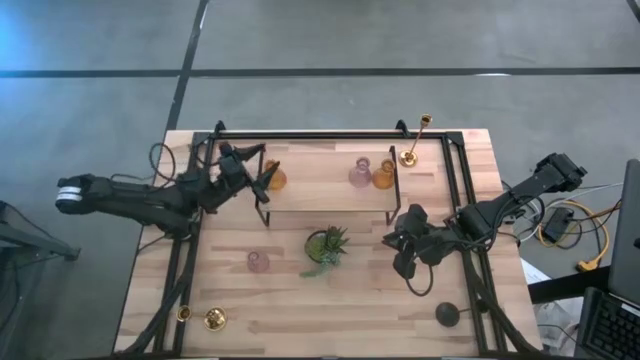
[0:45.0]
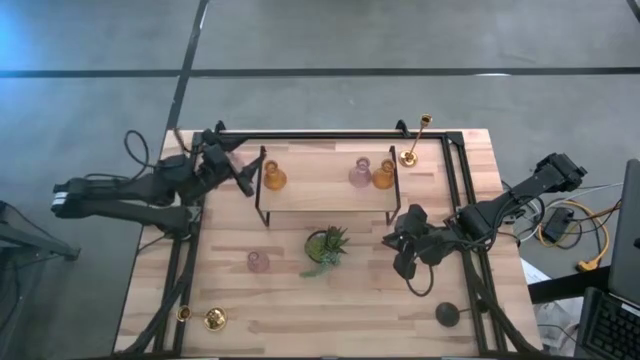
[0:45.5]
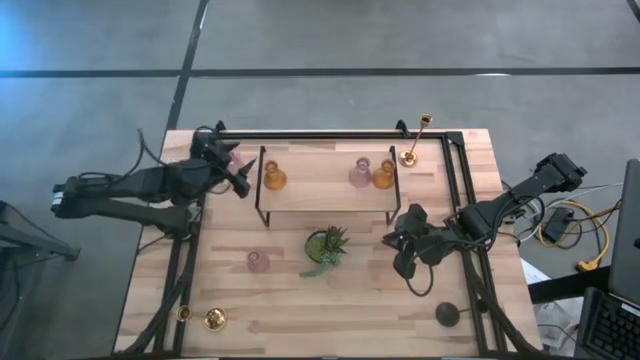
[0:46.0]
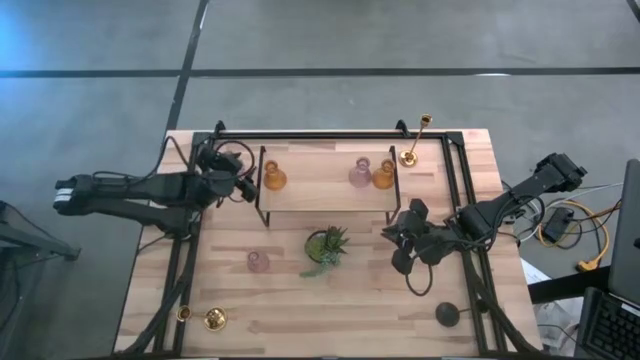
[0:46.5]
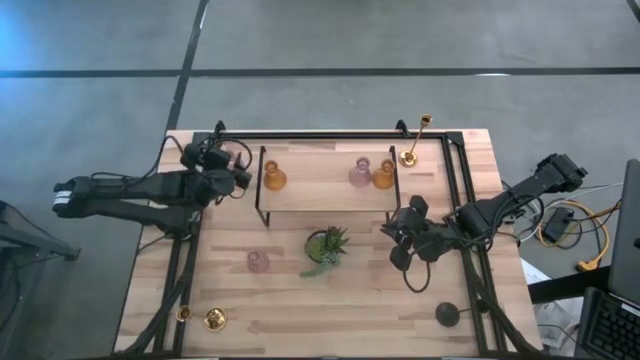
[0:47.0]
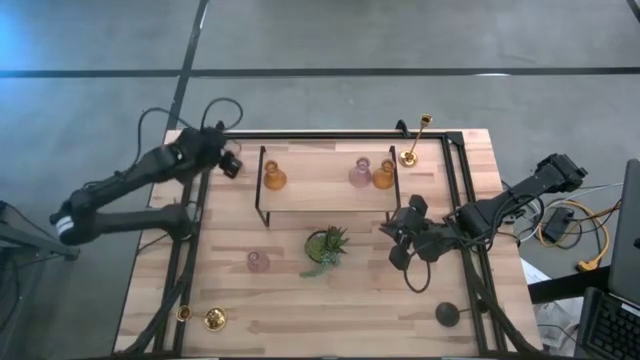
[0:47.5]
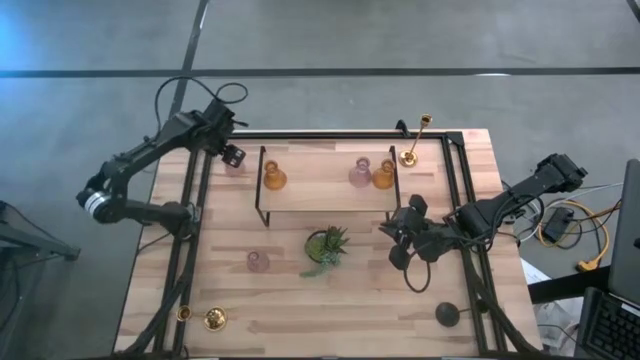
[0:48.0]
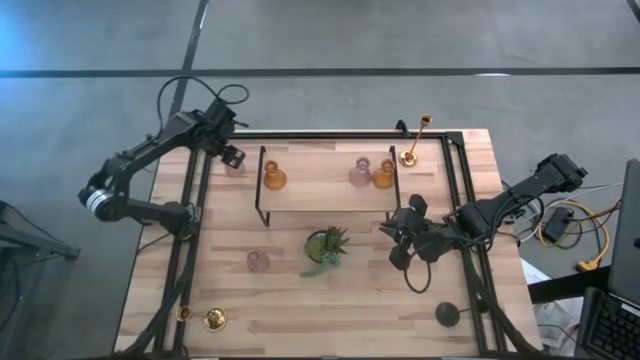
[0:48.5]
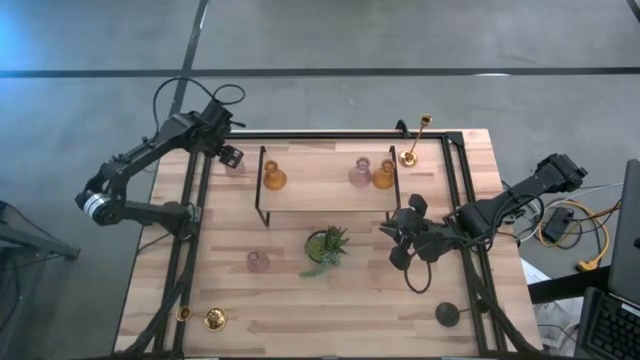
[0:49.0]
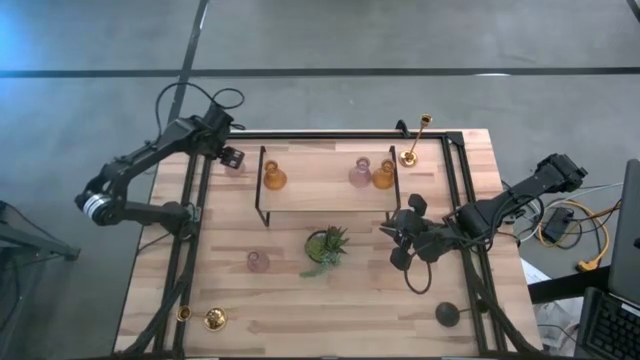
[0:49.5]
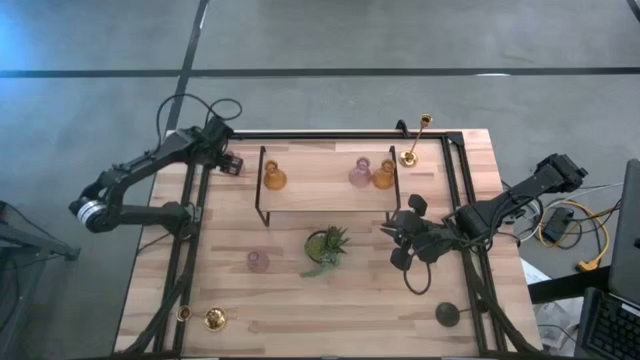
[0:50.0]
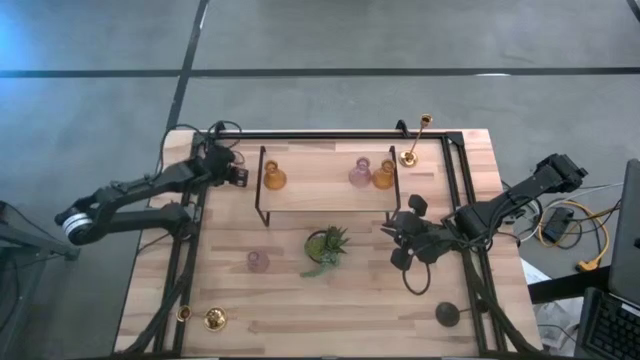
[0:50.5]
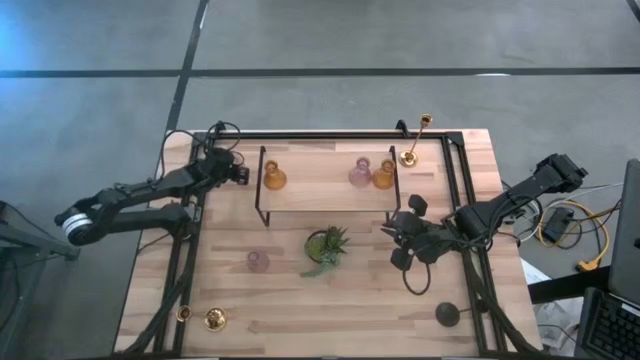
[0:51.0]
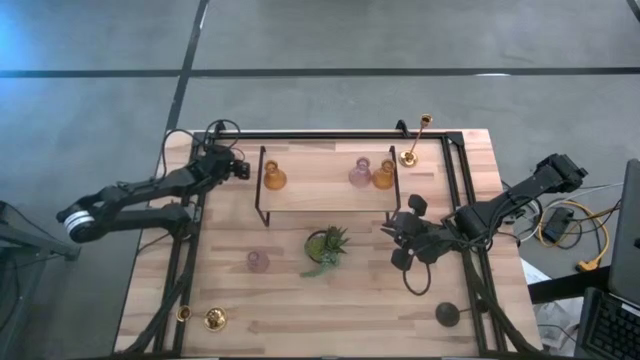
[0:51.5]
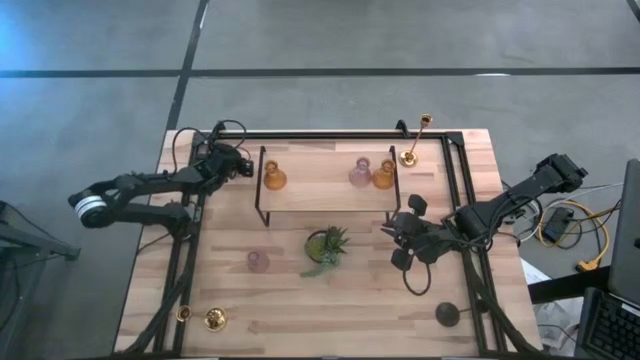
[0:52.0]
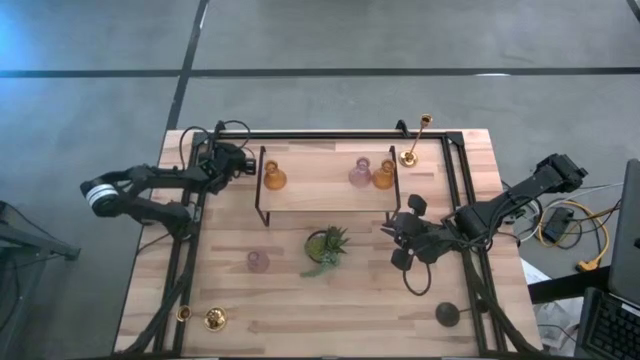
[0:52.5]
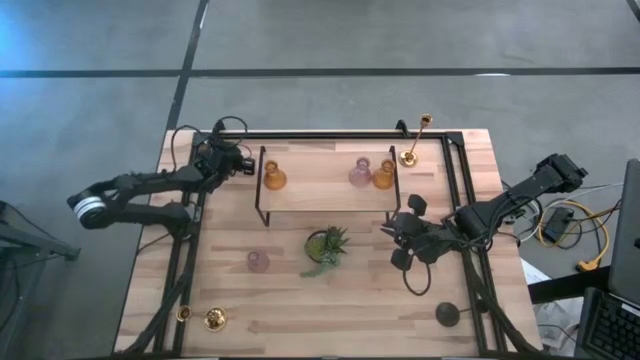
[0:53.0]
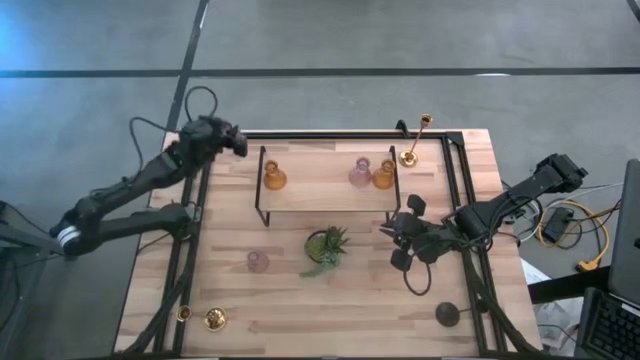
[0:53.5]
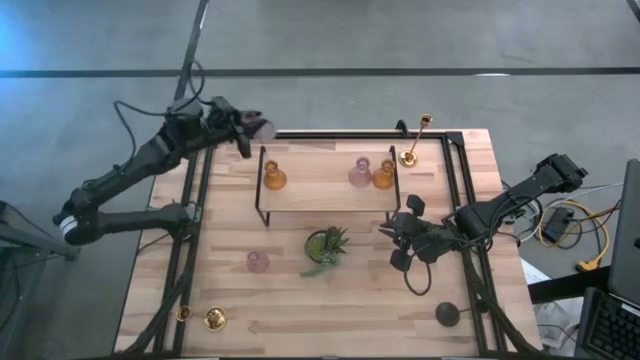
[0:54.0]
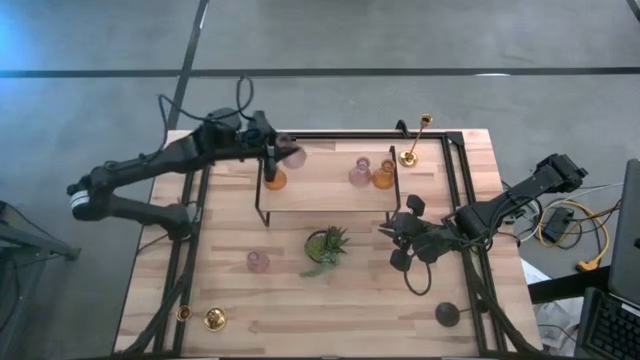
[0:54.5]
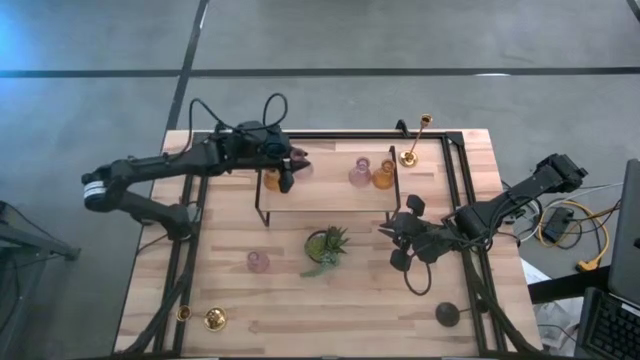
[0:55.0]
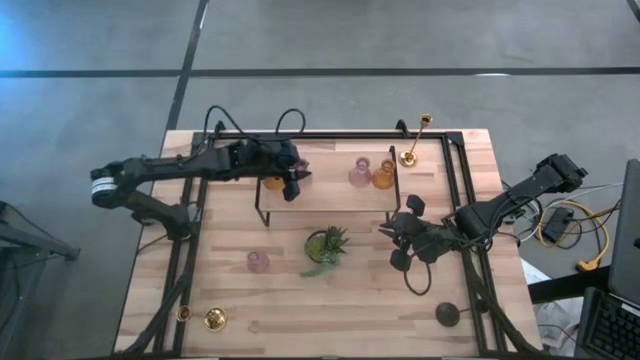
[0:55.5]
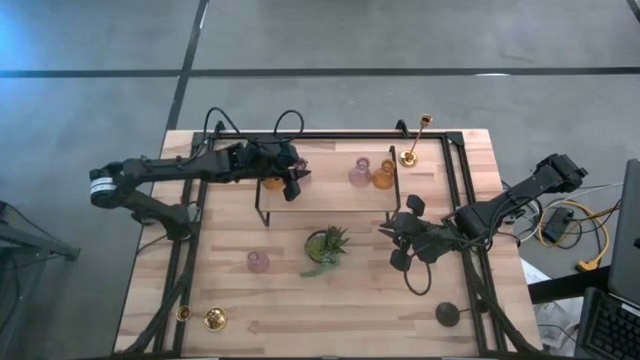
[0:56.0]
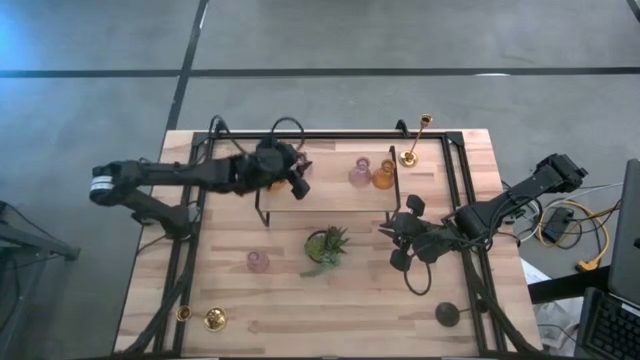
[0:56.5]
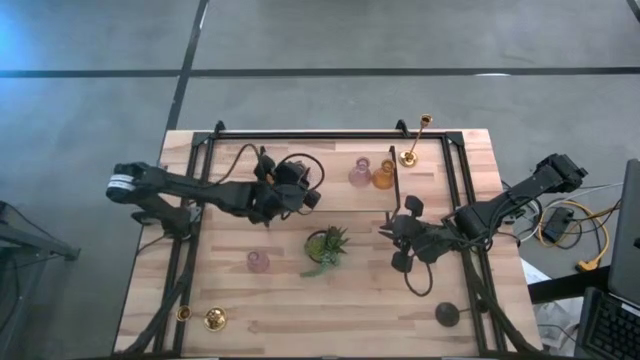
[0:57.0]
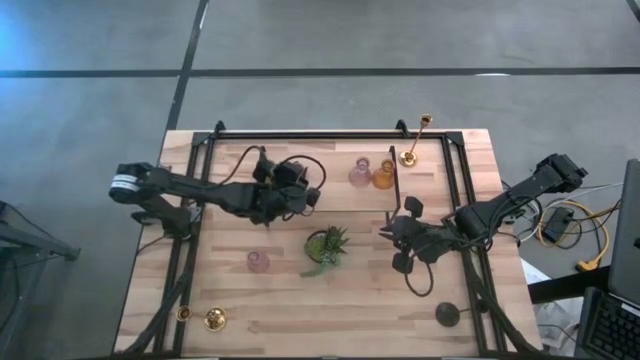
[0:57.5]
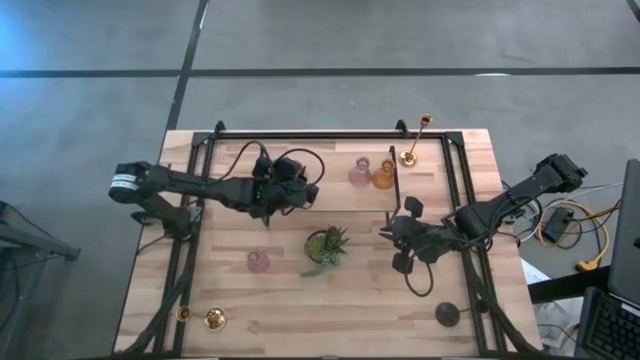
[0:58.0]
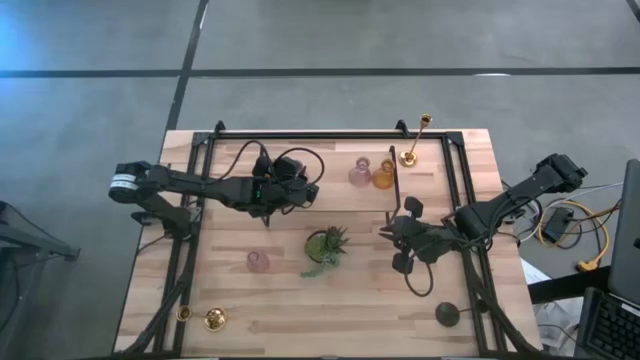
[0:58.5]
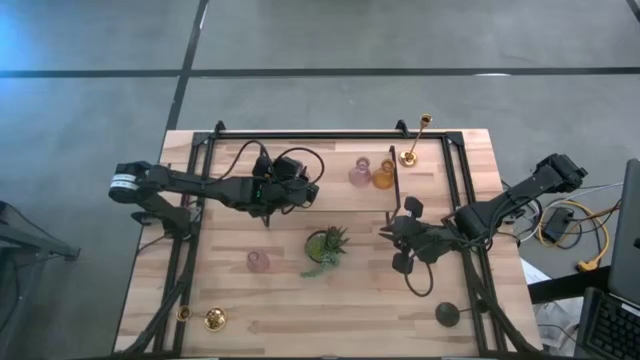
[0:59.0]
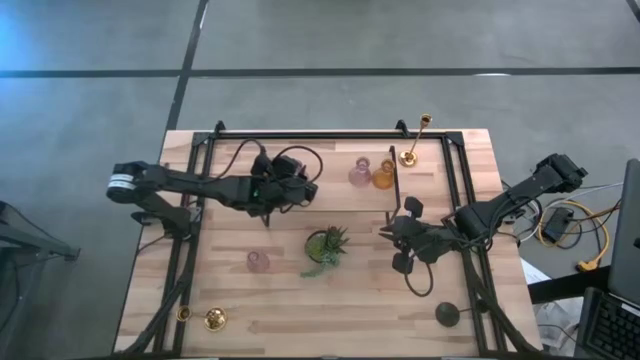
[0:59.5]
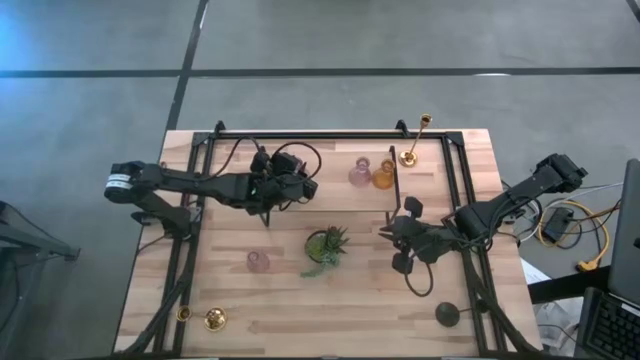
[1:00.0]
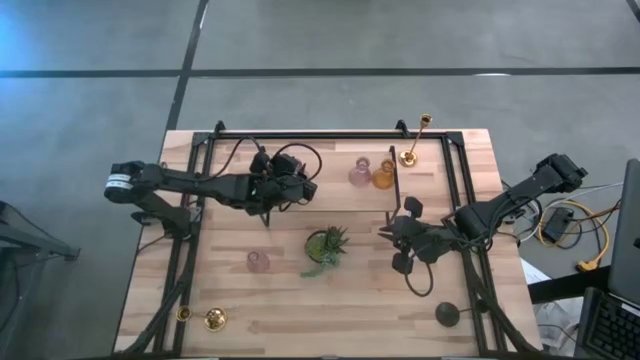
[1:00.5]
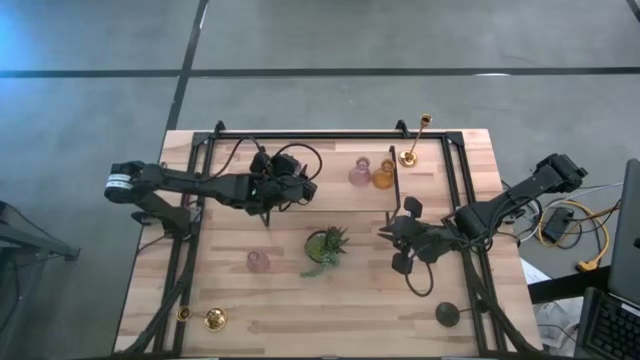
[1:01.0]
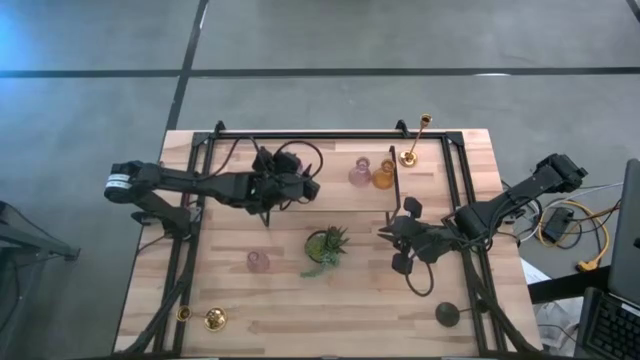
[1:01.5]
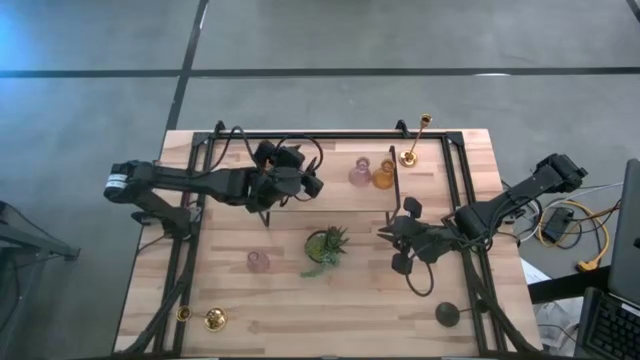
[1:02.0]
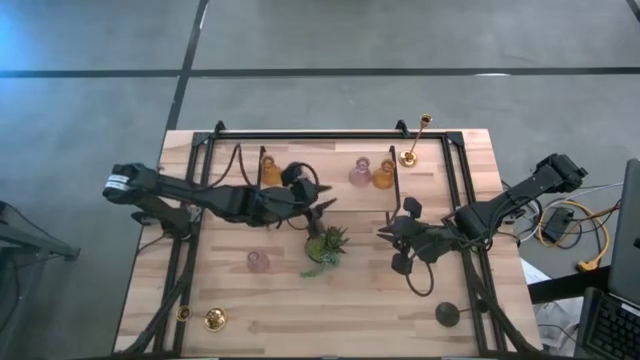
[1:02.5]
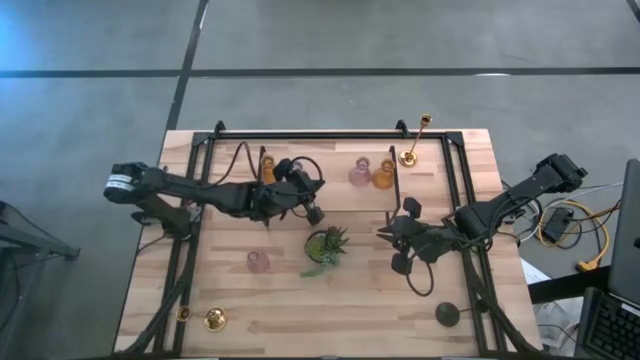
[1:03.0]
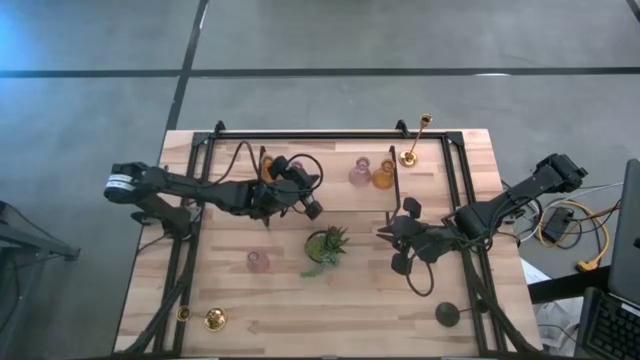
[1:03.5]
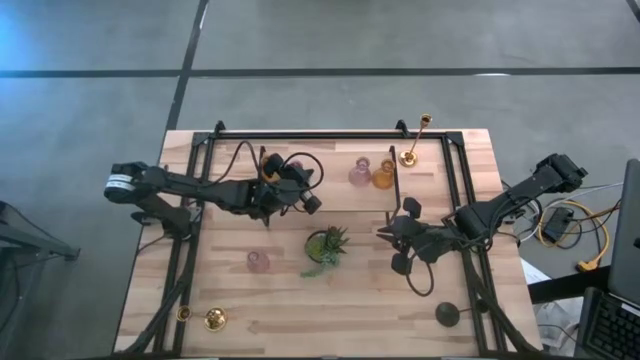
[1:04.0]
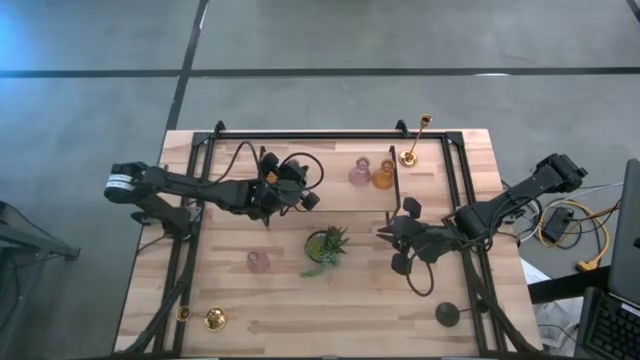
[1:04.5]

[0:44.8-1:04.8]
Task: Pick & Place candle stick holders
Put the pink glass candle holder on the shelf
